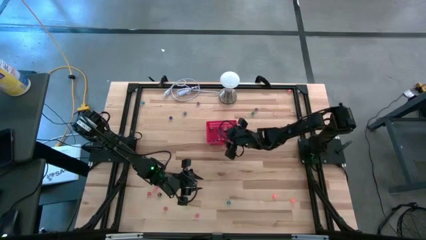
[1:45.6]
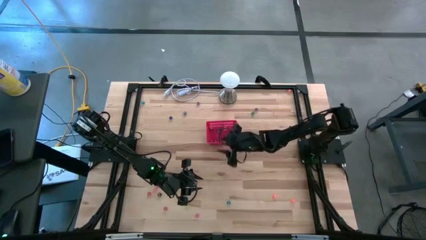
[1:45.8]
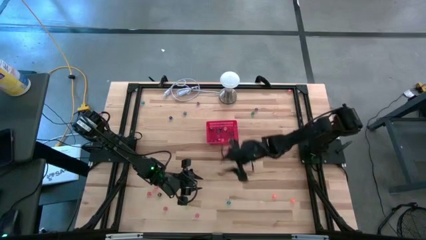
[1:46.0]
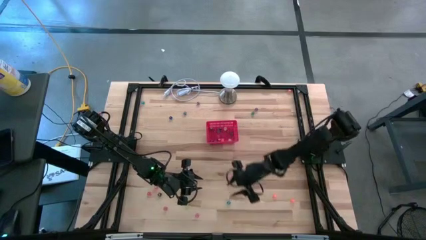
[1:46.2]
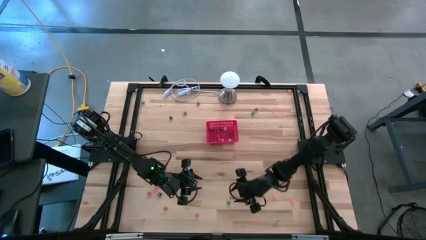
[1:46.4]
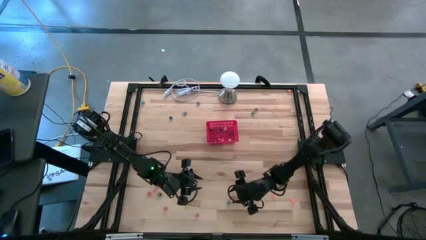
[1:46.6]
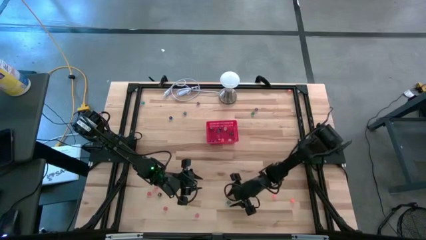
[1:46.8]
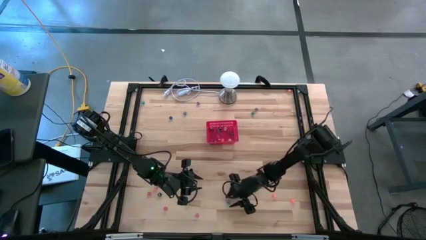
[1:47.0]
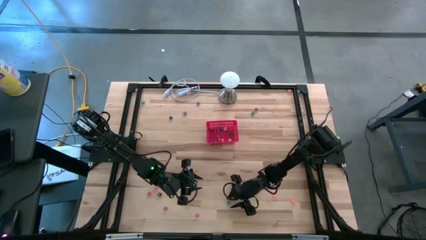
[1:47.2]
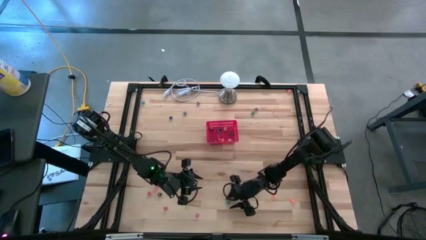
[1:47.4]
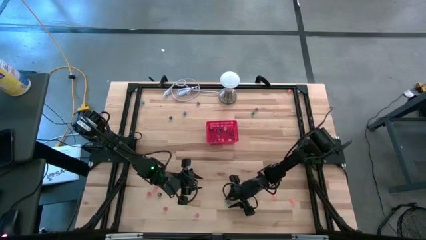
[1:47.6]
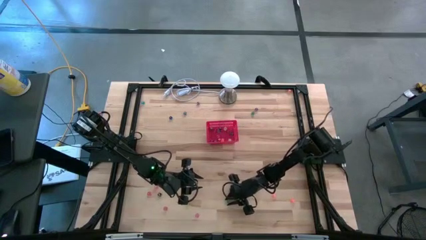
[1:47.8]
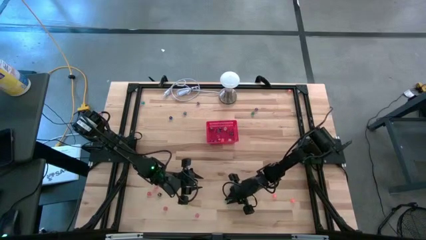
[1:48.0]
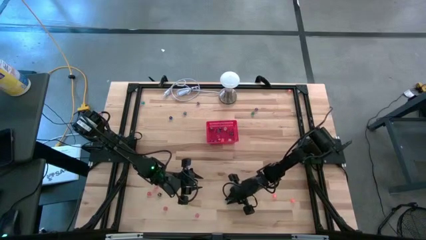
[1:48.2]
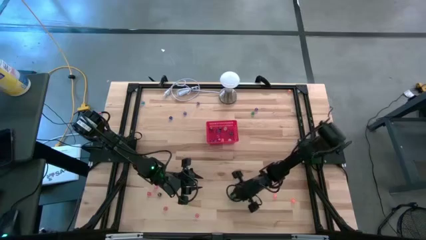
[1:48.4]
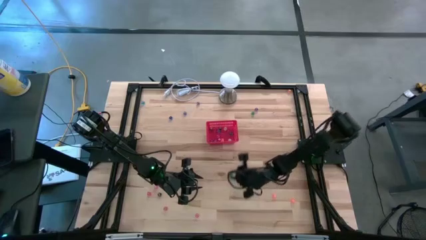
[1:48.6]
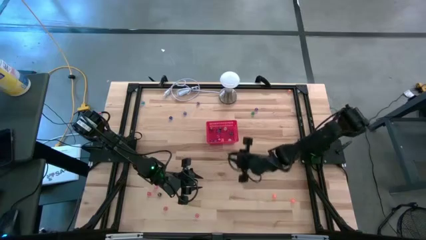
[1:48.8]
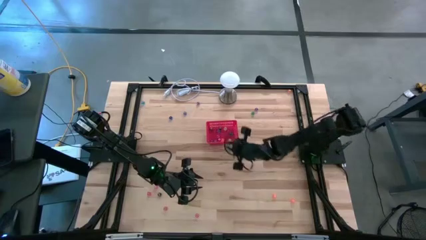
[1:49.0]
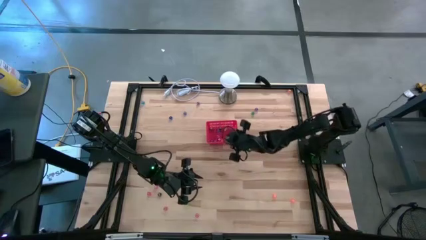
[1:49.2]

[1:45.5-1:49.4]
Task: Pick & Place Dice
Put the bottom light blue dice into the bin

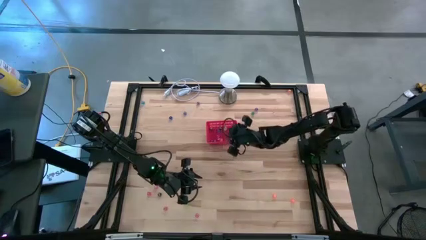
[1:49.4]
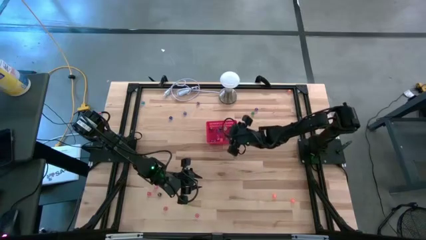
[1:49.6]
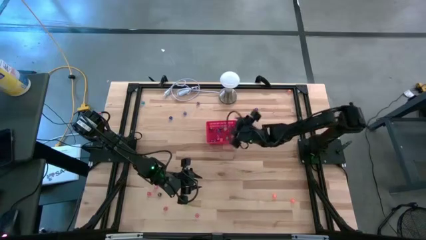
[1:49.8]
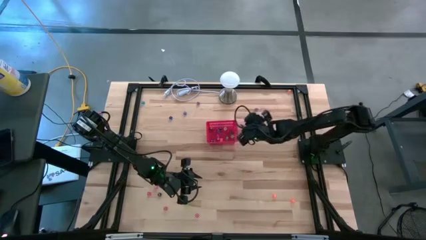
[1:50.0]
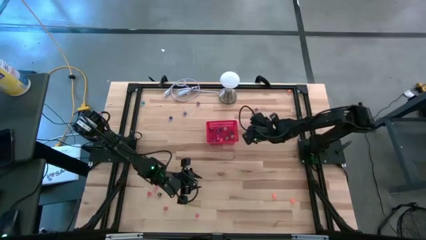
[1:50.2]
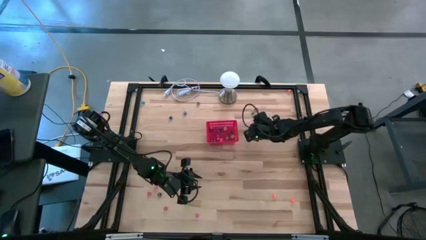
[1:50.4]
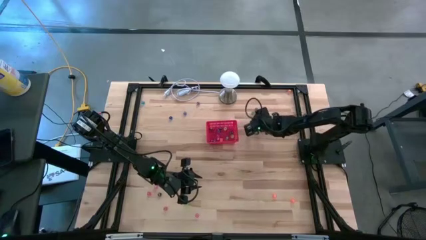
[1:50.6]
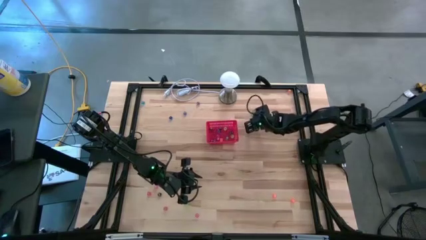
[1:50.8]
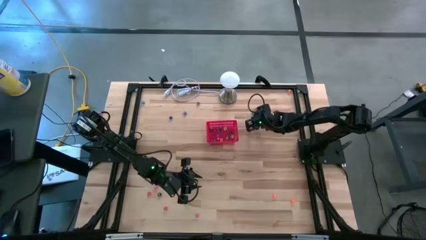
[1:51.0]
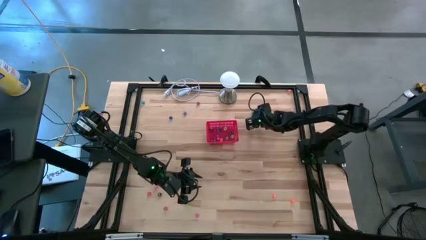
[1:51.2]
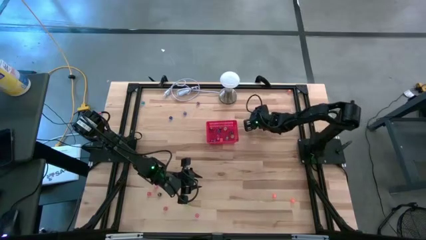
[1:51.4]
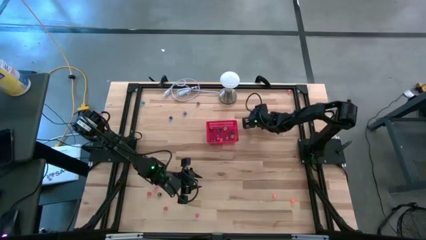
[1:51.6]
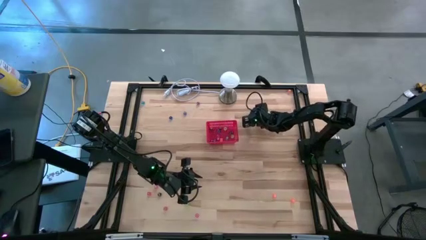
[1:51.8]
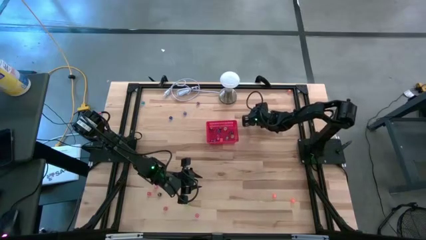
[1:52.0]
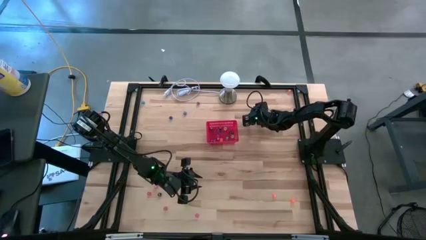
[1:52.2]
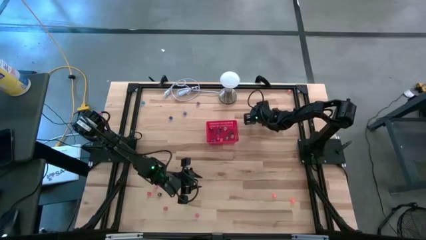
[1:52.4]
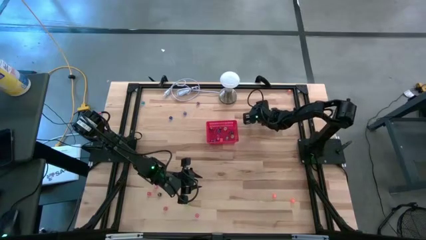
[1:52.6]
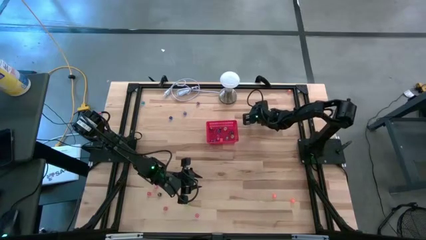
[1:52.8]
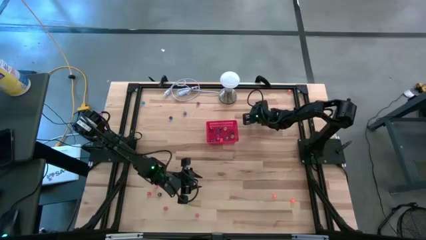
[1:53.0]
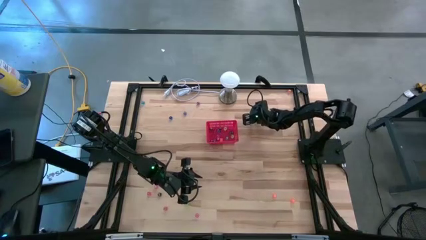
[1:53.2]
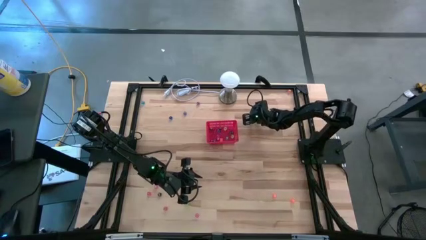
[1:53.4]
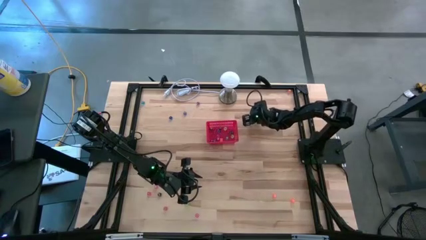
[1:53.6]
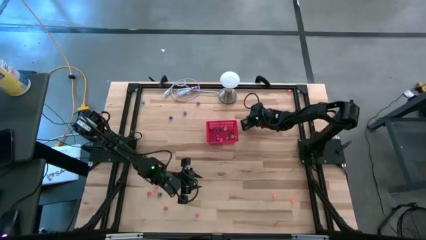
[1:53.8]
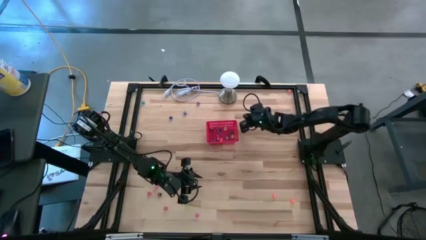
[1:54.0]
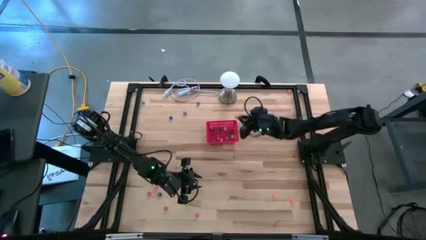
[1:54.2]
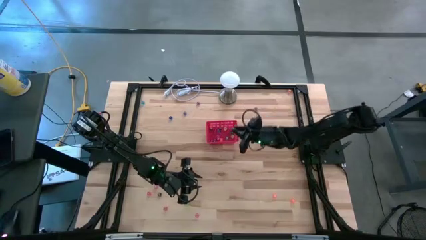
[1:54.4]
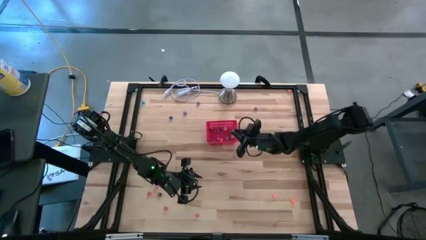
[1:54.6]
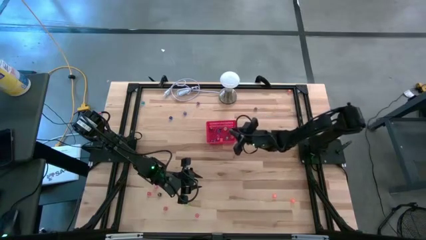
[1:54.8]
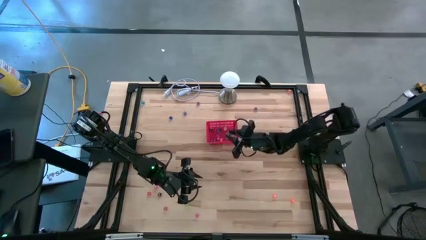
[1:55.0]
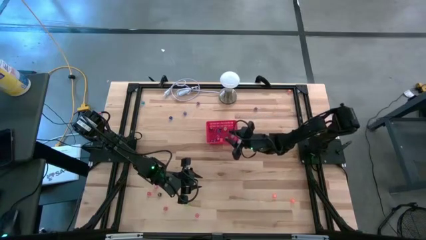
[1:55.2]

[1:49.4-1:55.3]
Put the green dice into the bin

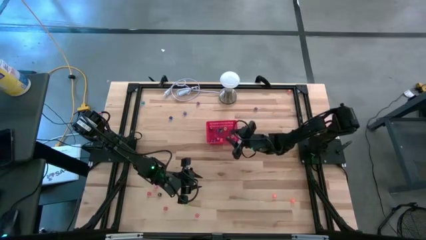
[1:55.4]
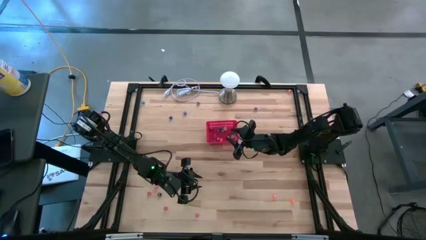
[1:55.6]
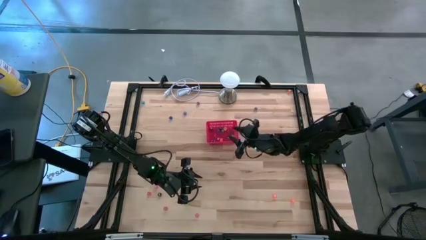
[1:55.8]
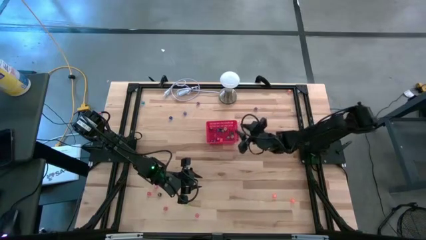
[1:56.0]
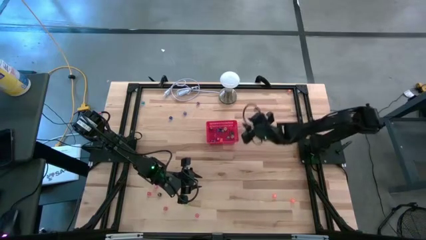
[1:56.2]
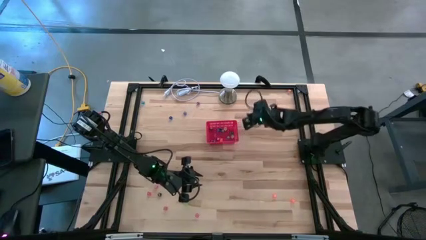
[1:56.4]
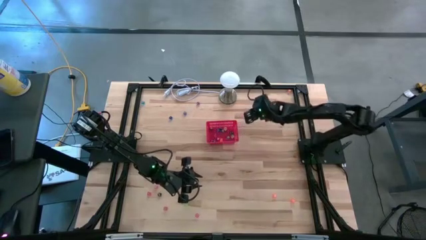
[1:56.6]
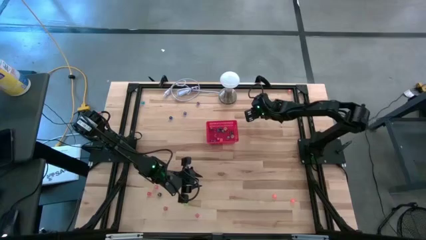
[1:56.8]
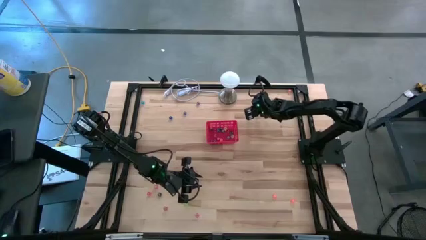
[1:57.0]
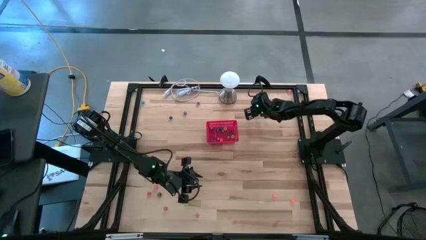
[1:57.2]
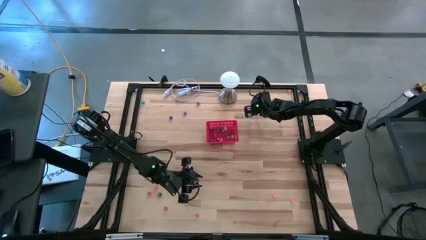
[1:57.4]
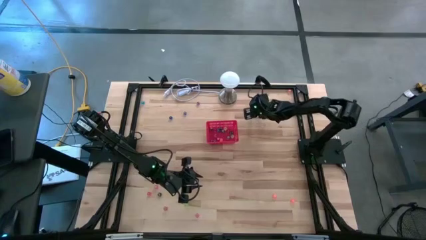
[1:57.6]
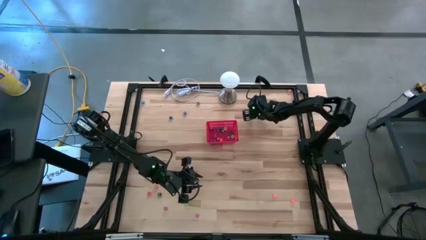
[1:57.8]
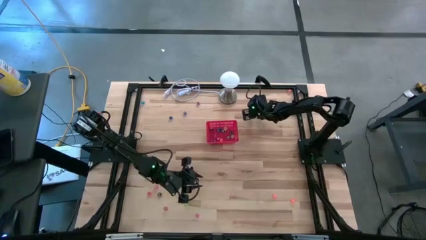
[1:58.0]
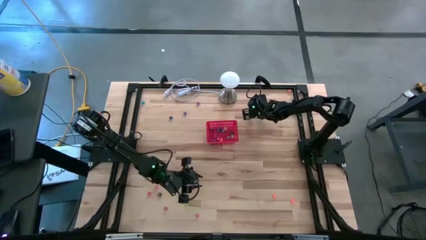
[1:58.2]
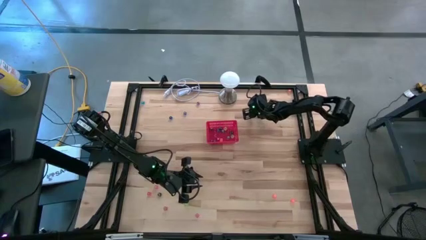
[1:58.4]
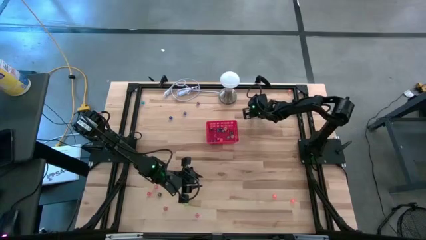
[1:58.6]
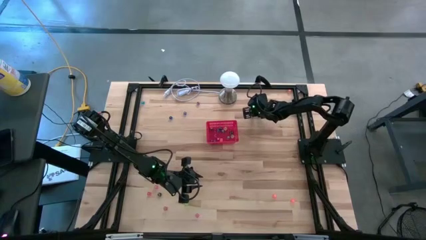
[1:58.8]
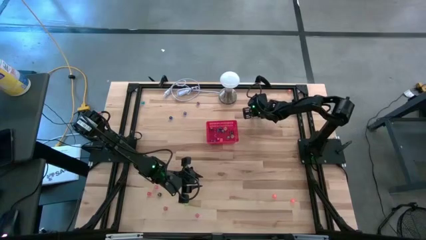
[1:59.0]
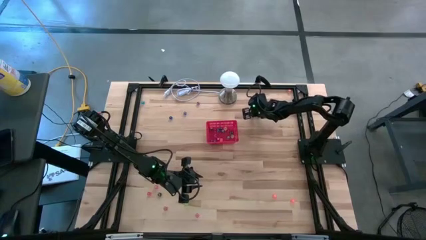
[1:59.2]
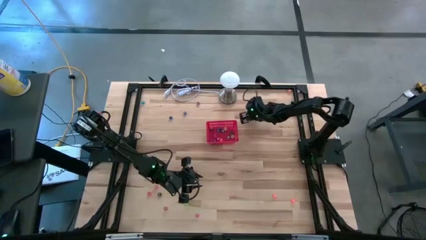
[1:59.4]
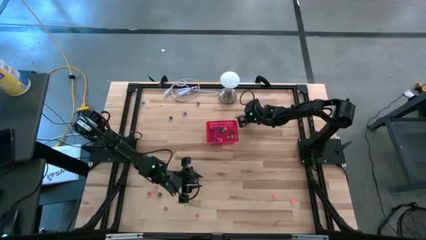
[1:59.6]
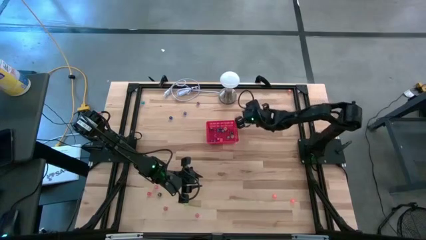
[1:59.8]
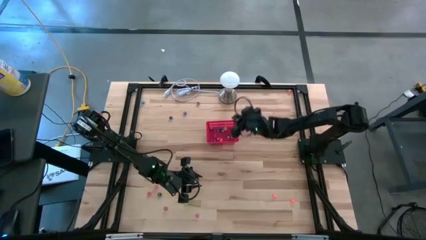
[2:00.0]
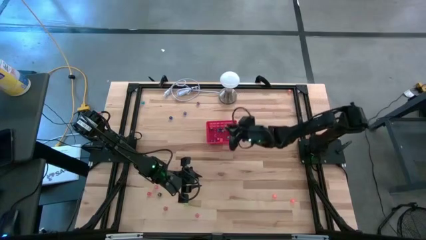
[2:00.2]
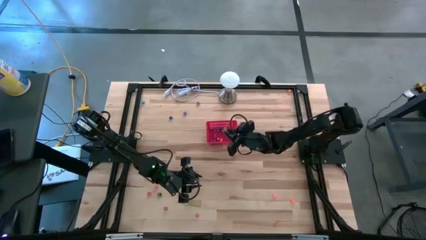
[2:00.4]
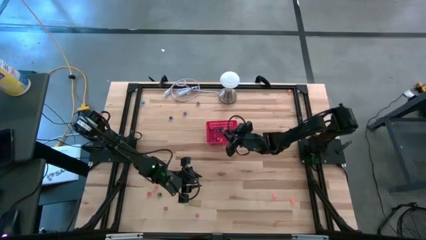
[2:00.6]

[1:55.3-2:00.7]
Put the right purple dice into the bin

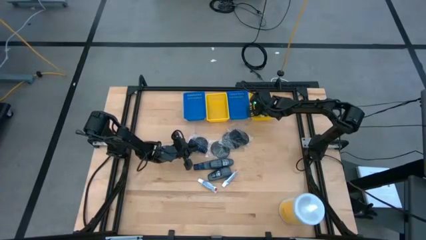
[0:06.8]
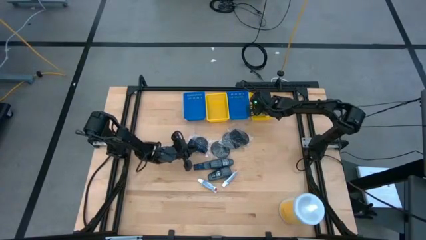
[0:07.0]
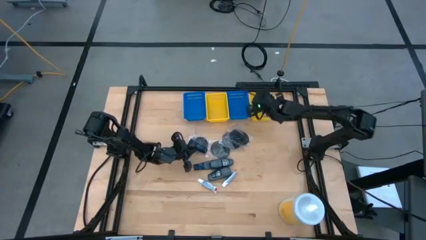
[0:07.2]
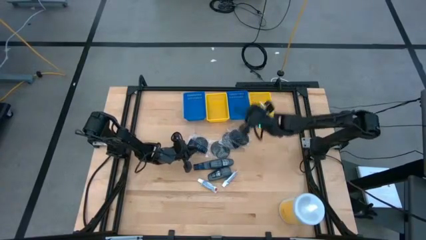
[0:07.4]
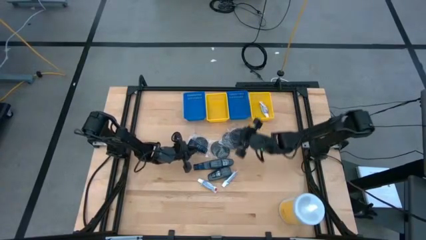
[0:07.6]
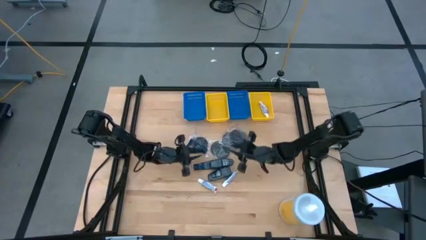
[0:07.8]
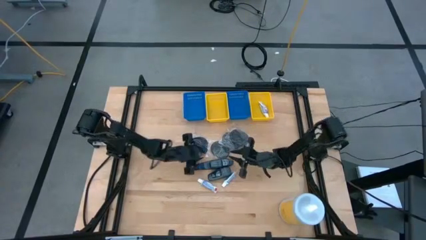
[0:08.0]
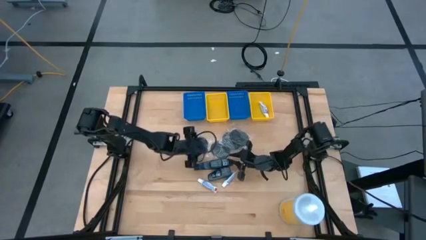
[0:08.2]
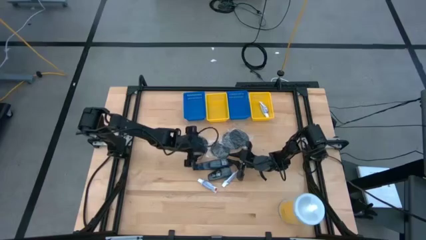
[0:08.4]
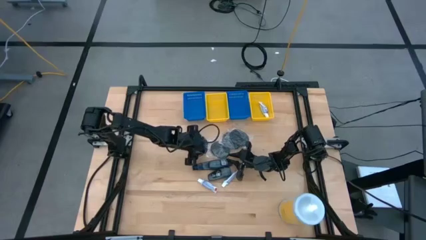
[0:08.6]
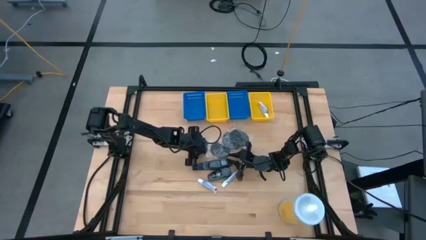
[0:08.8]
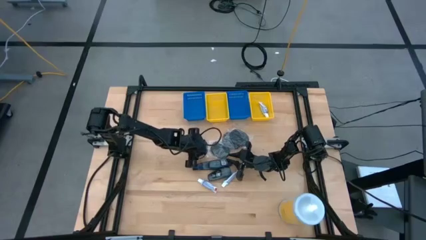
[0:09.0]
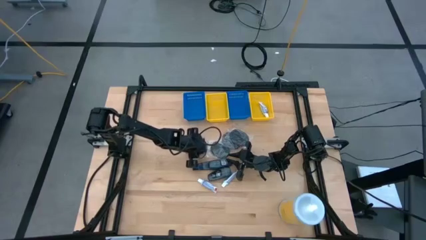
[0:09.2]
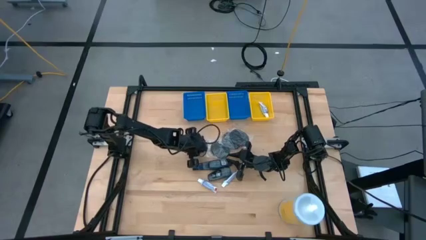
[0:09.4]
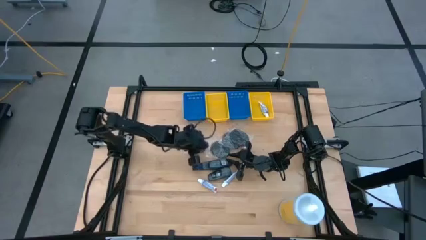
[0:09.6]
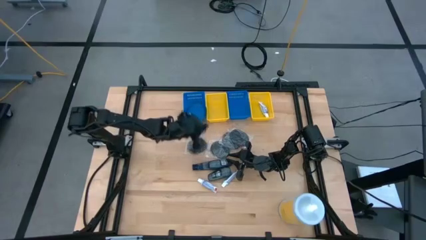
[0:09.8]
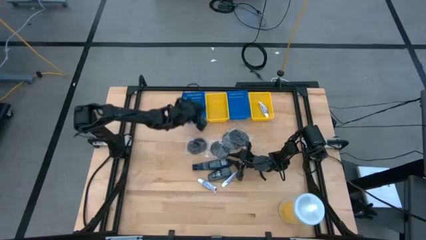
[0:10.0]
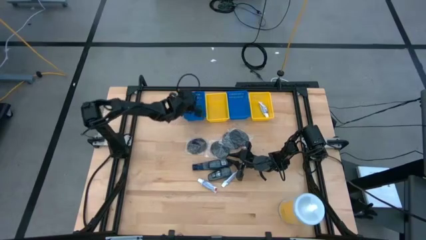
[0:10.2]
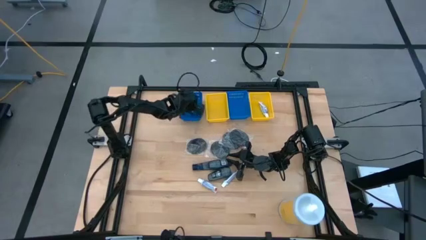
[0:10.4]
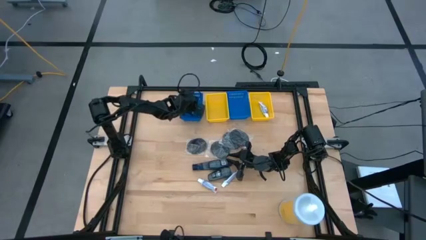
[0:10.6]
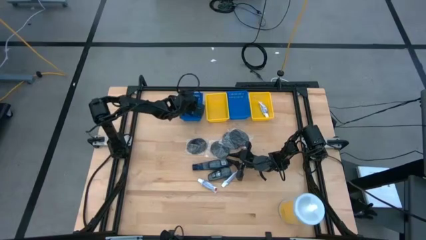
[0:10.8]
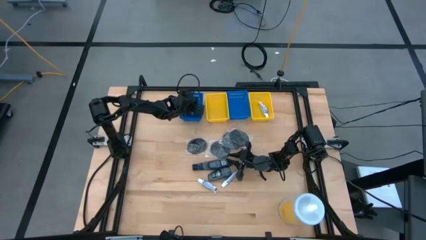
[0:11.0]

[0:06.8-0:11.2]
Task: Pick & Place Travel size toiletries
Put the blue shave cream into the left blue bin
